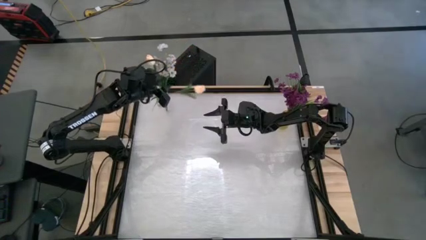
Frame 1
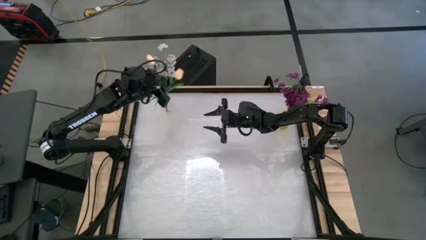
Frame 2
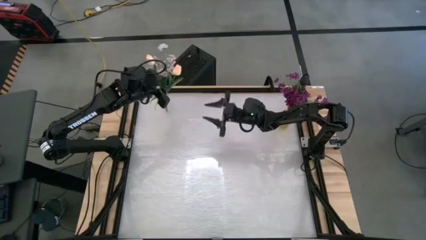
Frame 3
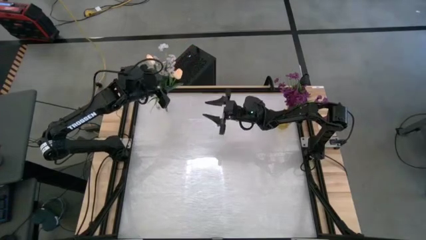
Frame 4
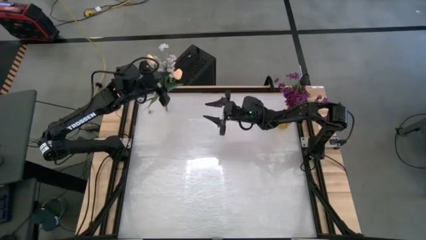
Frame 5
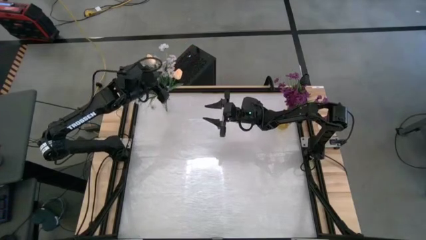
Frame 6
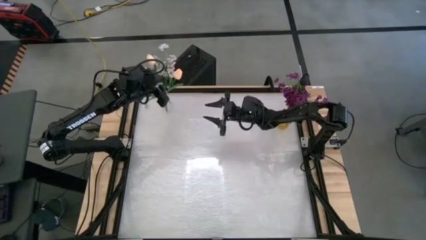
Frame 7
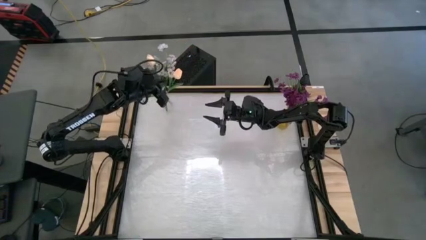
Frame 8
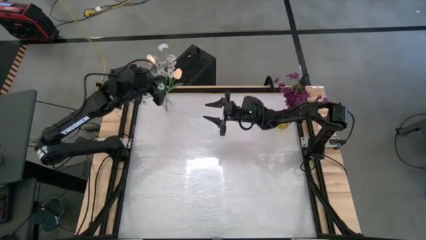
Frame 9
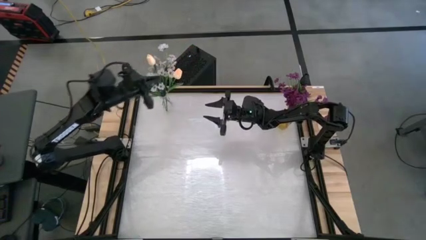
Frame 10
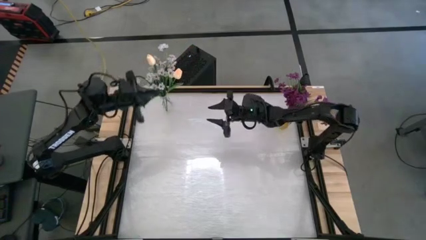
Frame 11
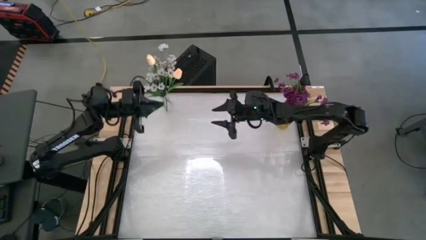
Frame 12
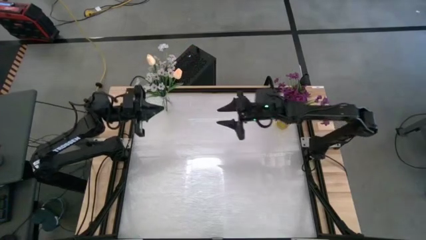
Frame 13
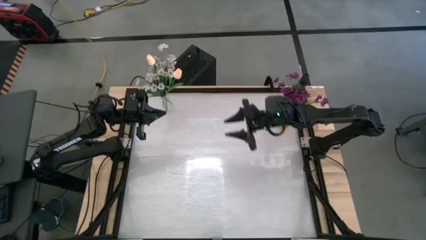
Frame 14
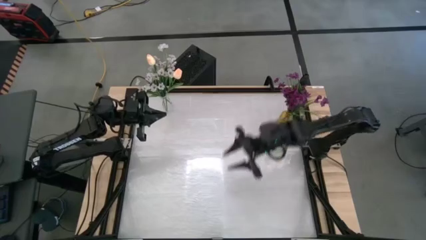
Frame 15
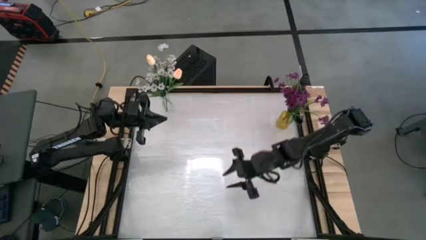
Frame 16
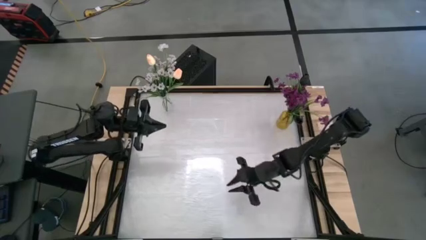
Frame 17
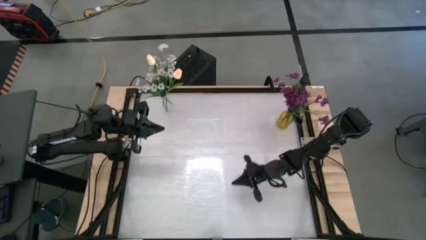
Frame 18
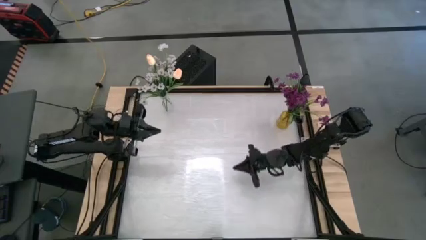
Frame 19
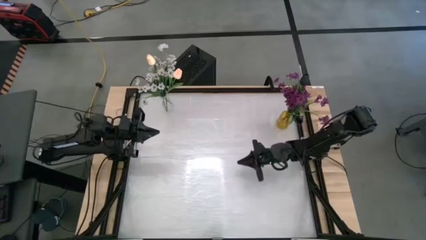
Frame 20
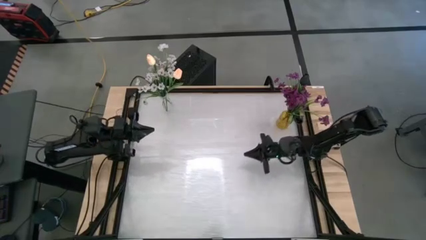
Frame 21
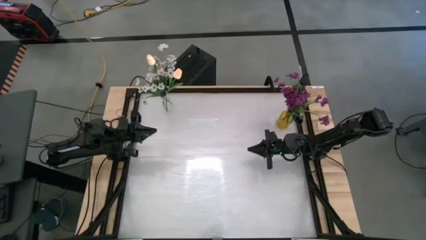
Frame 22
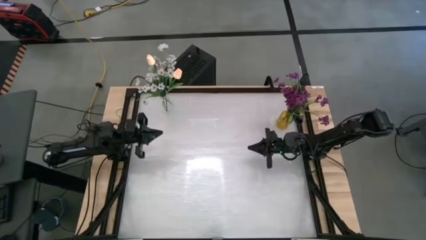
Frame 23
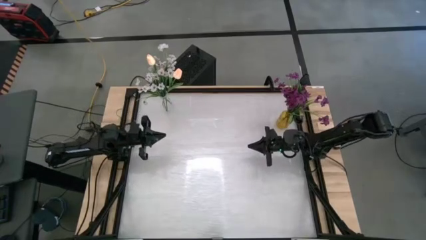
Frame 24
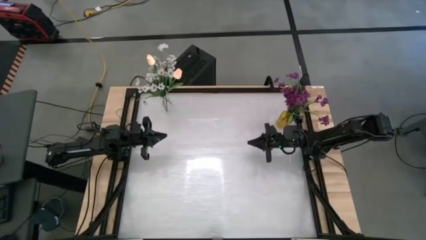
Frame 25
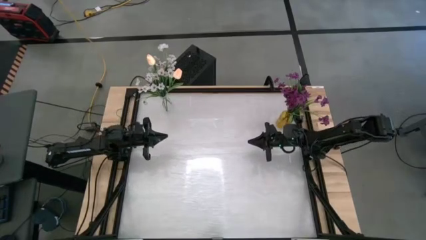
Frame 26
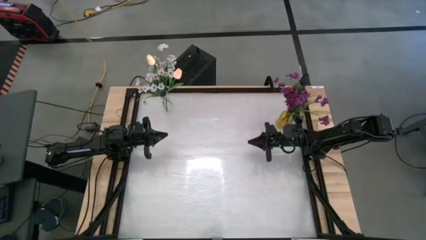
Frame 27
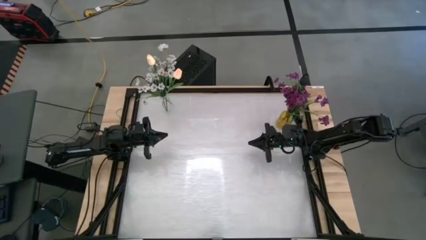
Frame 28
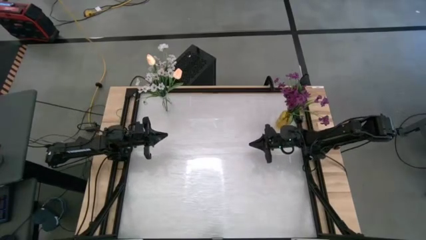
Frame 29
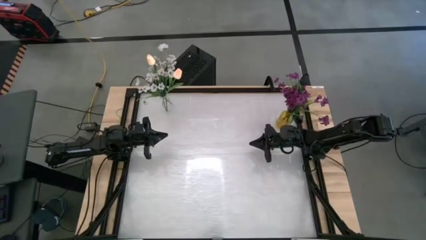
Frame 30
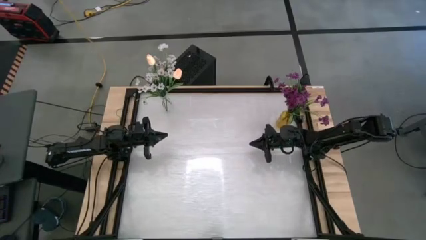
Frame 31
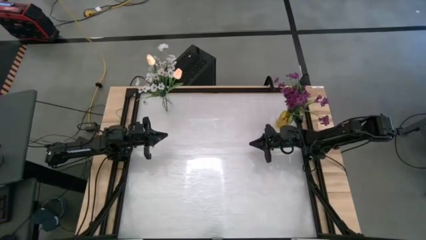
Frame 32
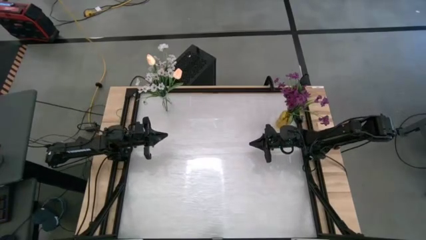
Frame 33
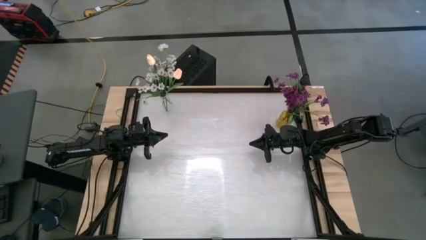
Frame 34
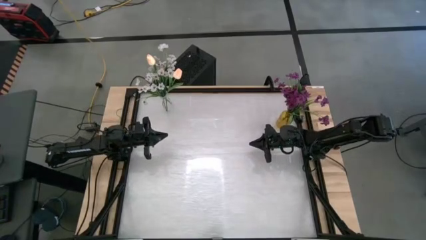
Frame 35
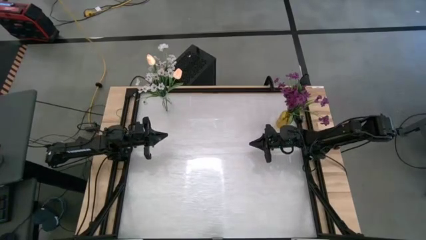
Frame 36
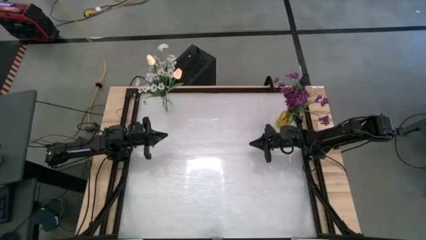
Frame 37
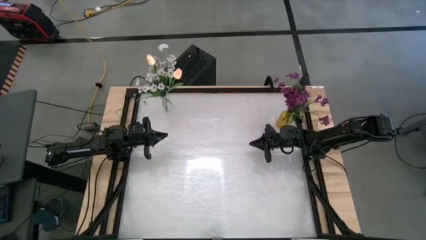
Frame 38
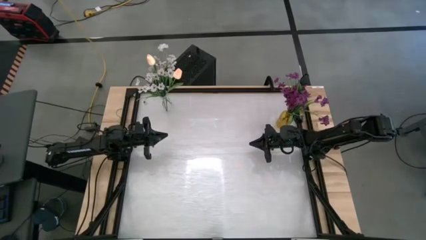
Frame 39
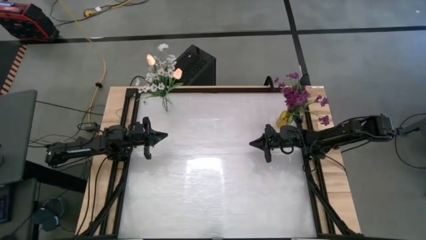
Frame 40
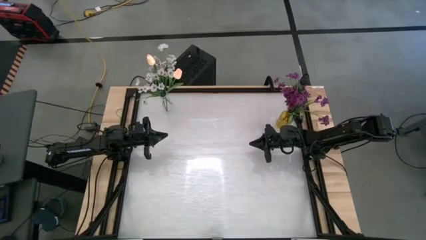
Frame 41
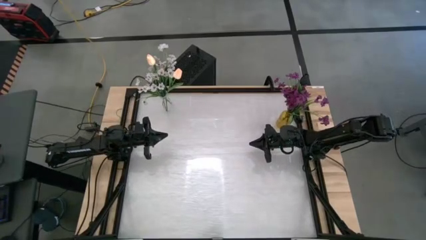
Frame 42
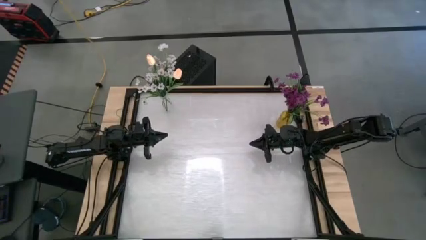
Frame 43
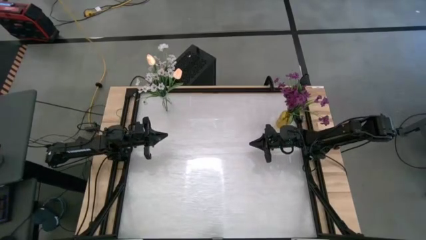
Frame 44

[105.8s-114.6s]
Task: Sort flowers into vase by color
Return to Home Position

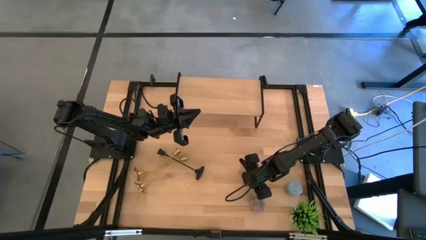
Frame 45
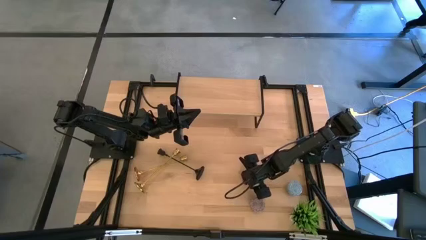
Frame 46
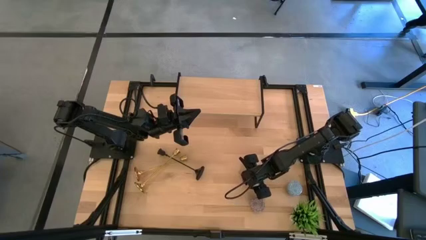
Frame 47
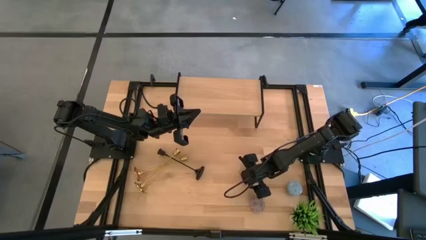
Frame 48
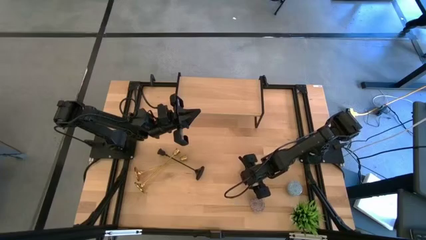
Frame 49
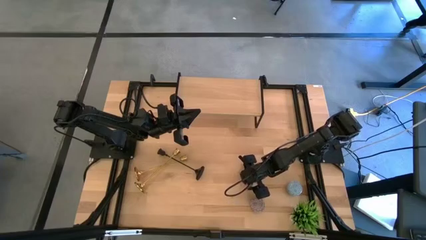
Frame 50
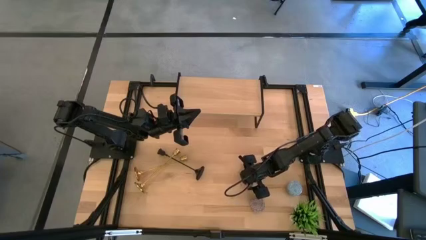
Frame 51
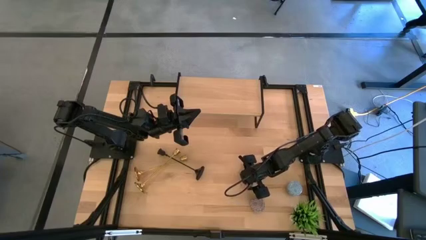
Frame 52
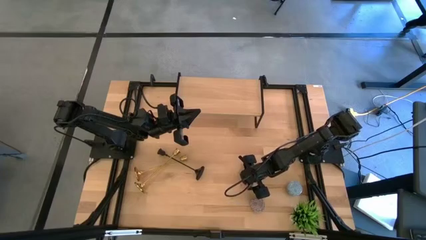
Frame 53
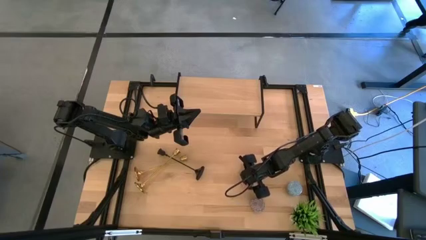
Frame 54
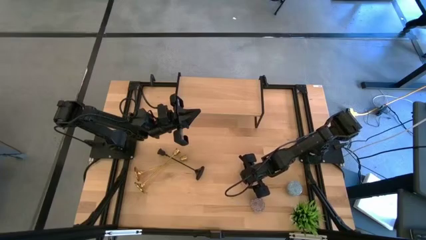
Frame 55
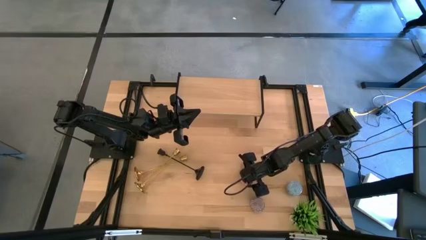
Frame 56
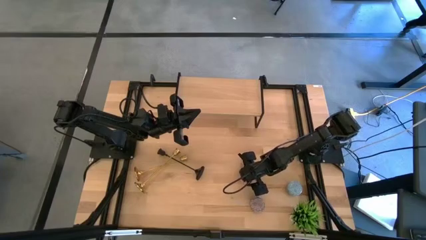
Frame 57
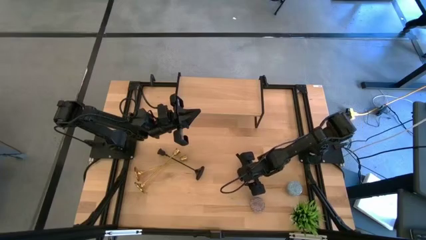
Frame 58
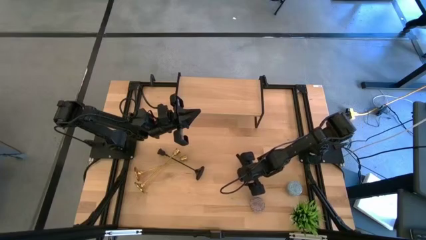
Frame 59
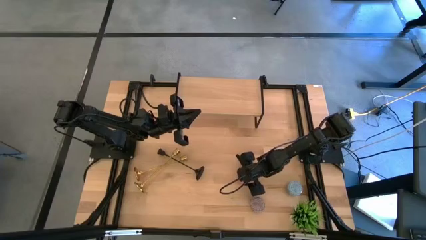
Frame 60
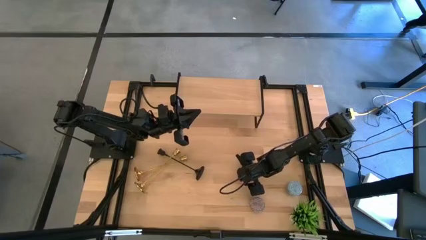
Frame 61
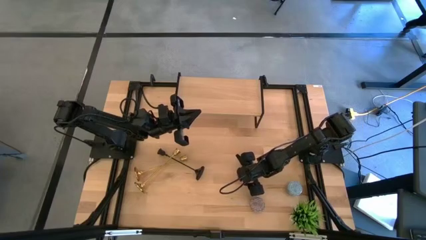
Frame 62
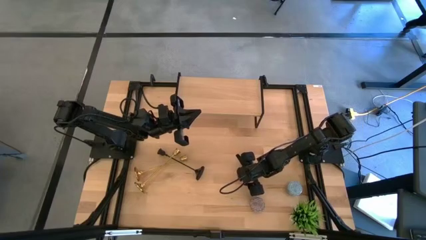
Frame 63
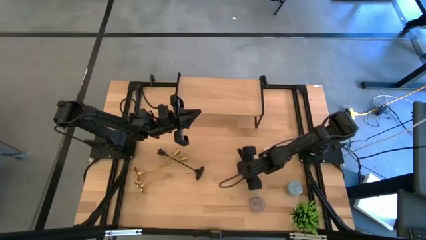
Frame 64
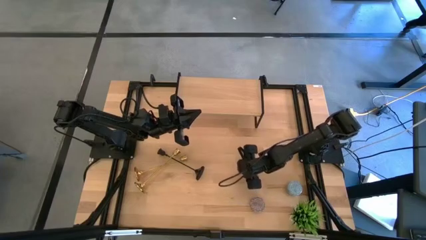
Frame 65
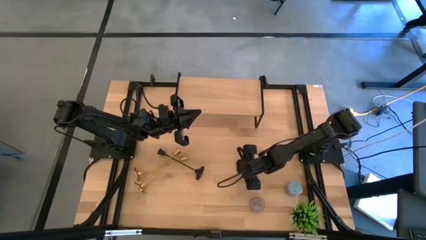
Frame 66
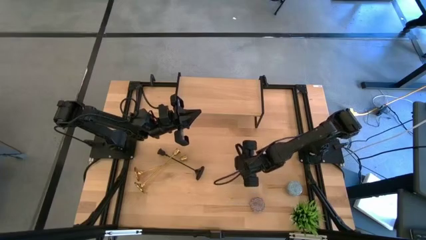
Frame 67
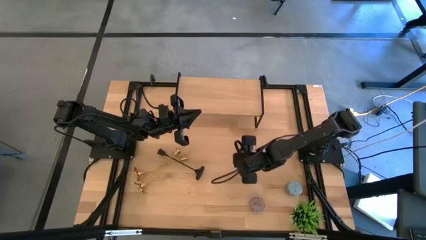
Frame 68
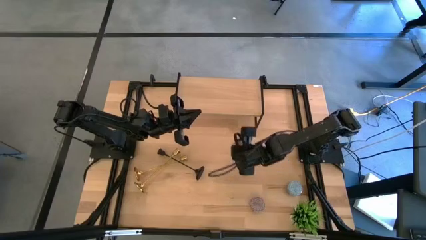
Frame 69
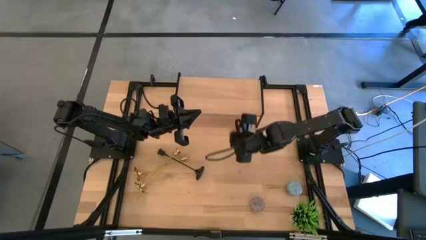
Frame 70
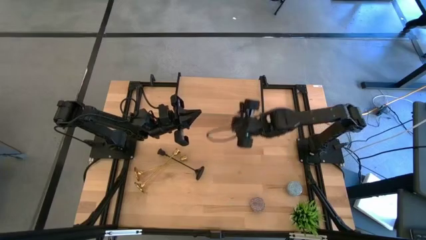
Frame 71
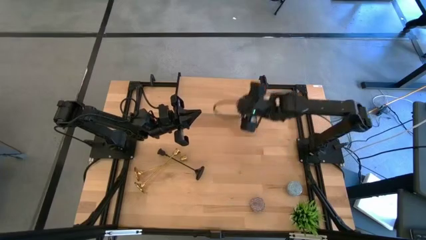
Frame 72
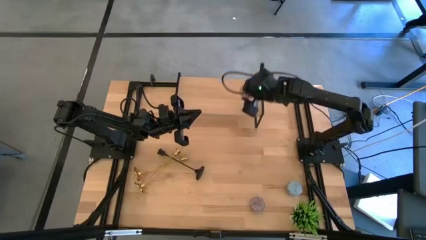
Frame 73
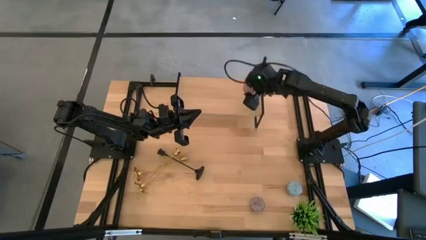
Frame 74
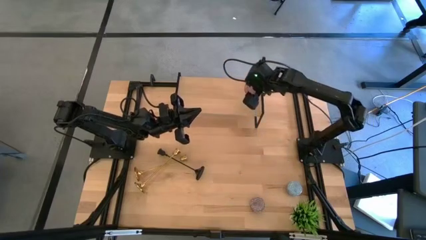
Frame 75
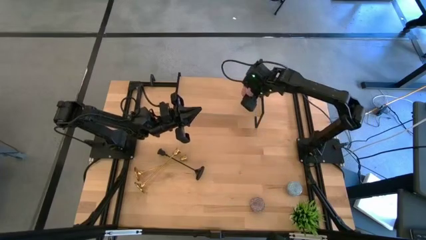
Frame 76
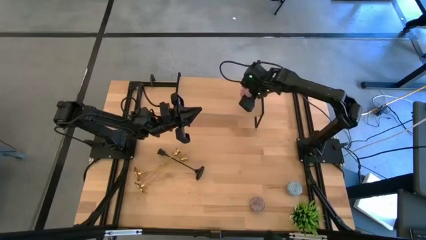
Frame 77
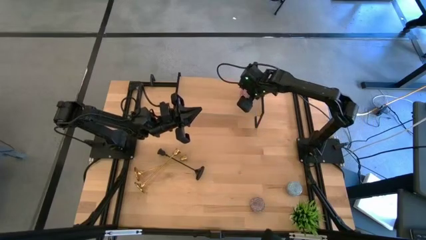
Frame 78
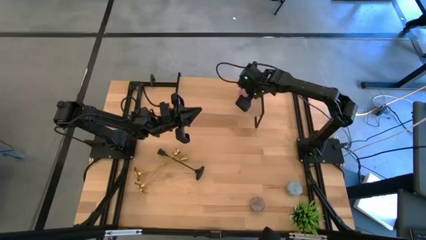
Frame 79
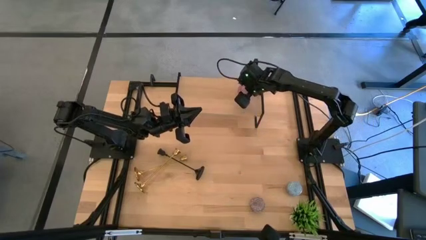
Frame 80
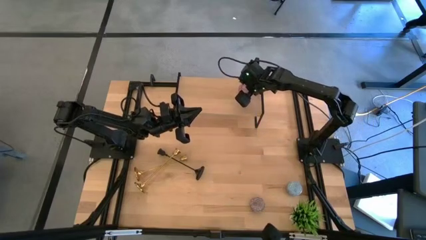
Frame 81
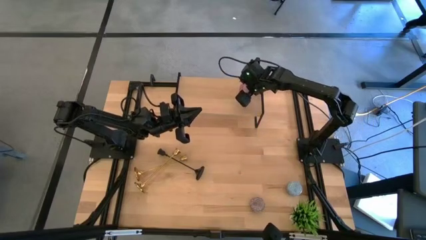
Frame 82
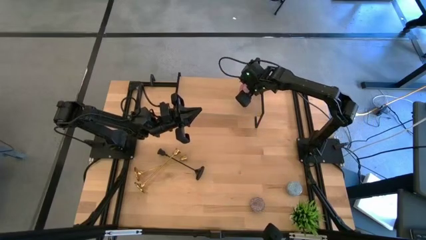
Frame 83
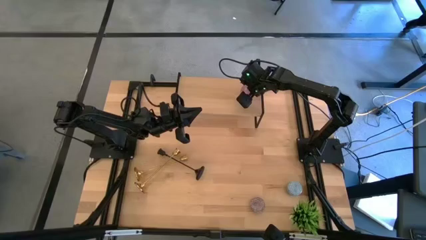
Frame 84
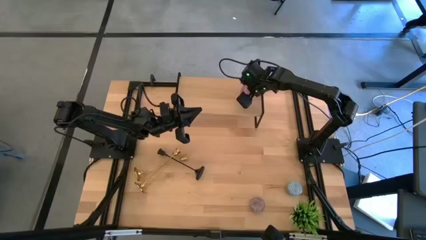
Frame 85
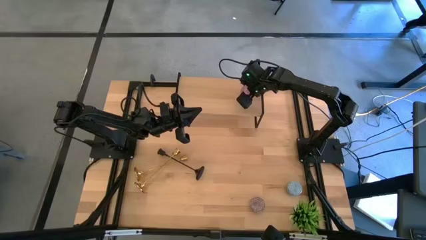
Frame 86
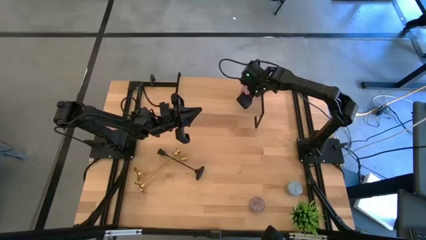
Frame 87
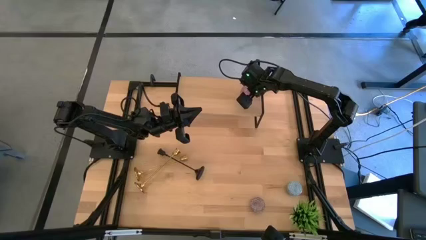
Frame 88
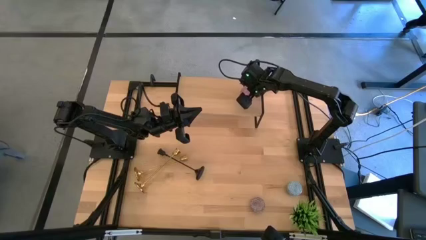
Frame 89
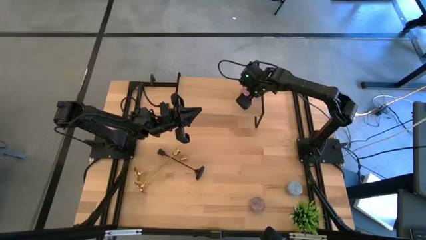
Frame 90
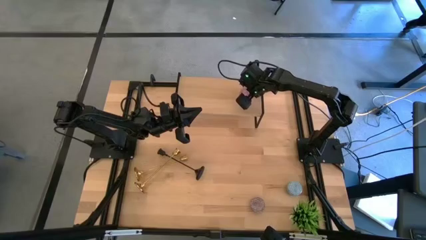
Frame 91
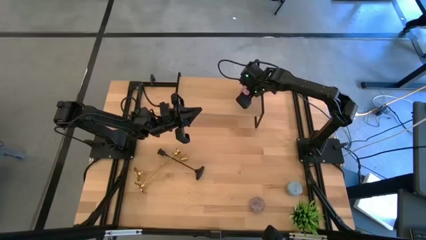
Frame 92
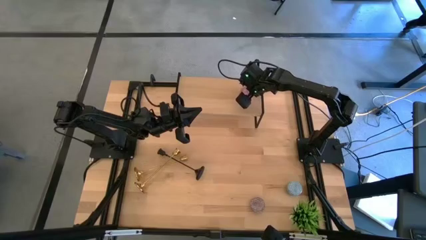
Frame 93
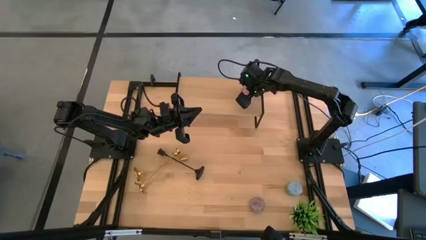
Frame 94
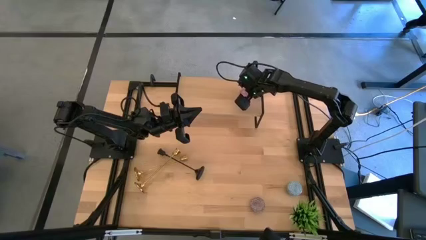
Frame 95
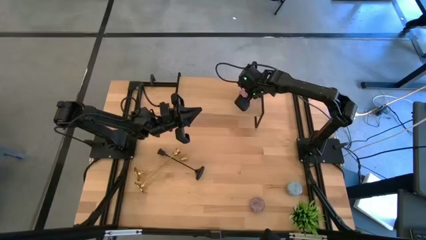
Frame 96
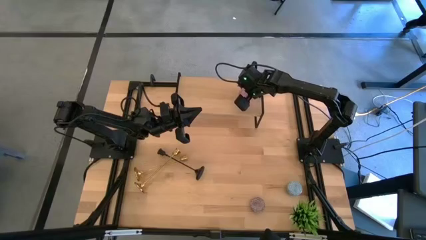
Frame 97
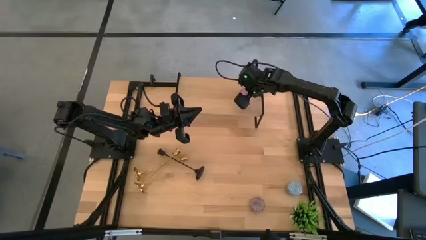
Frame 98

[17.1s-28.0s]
Task: Pick & Place candle stick holders
Put the pink scented candle on the shelf
